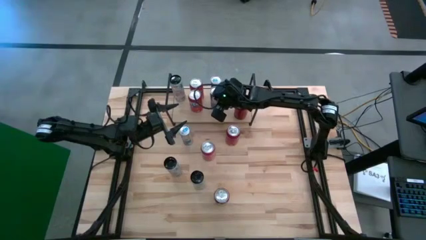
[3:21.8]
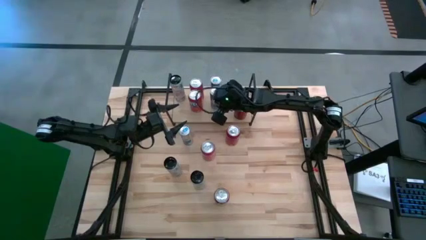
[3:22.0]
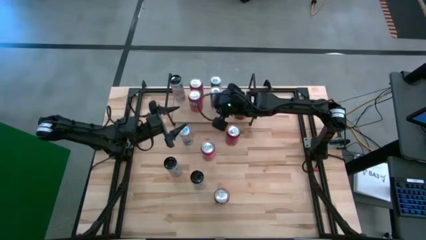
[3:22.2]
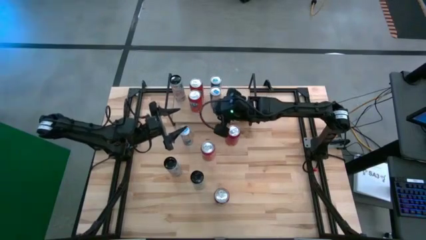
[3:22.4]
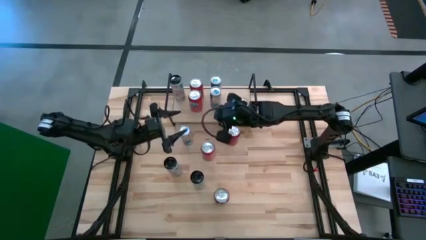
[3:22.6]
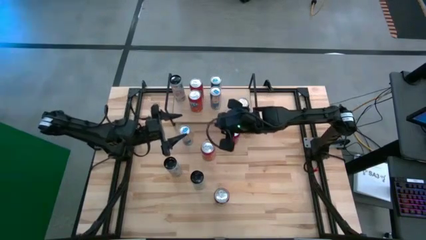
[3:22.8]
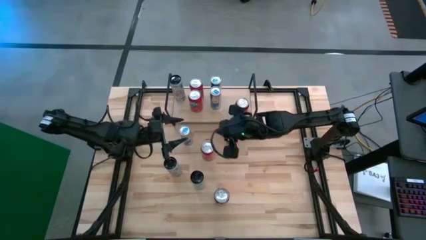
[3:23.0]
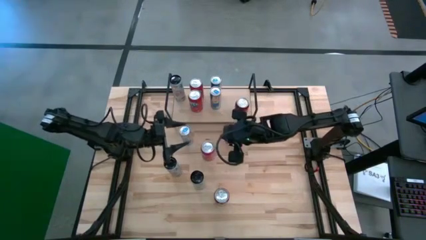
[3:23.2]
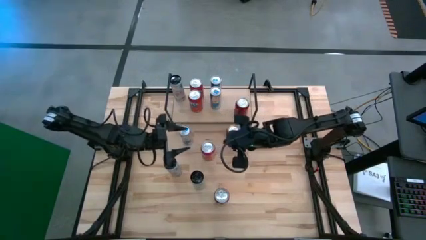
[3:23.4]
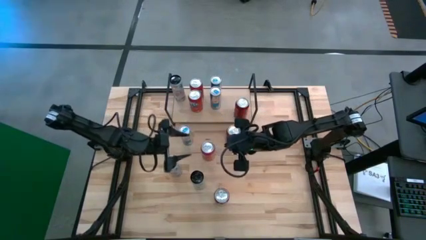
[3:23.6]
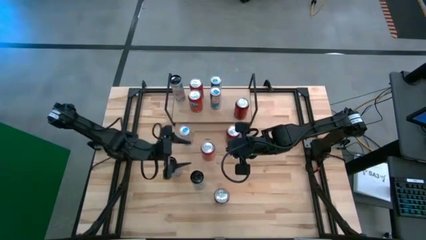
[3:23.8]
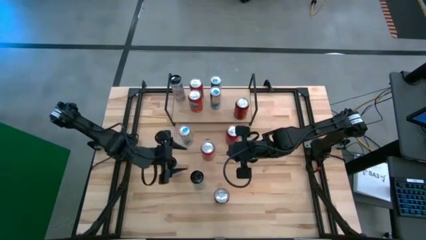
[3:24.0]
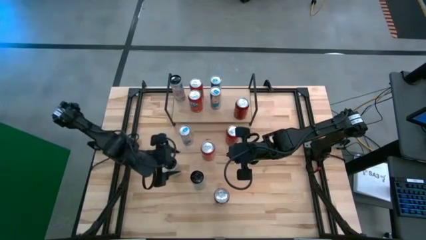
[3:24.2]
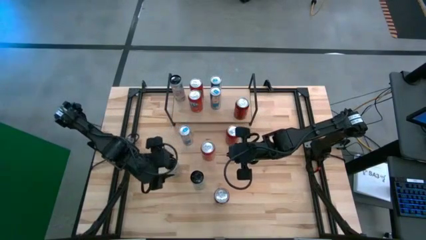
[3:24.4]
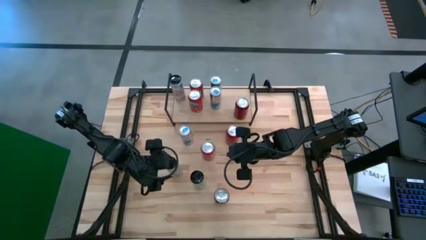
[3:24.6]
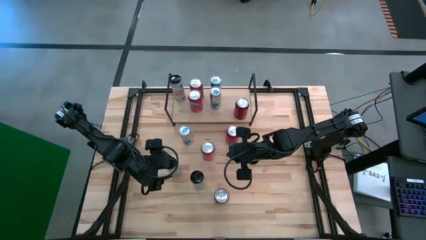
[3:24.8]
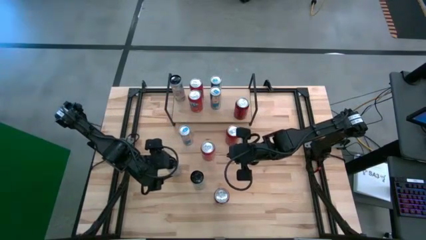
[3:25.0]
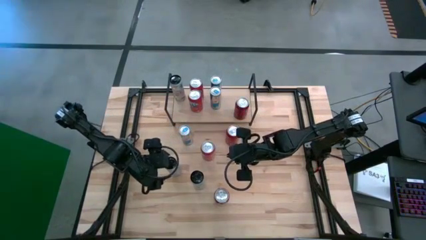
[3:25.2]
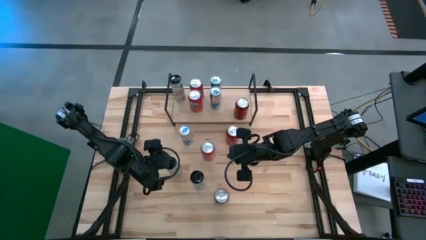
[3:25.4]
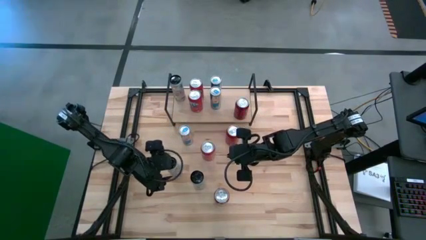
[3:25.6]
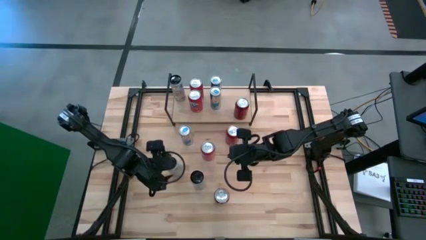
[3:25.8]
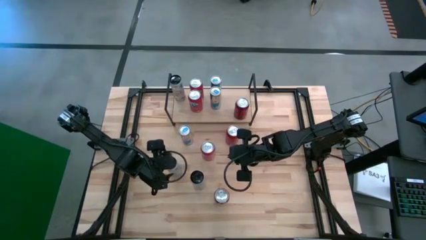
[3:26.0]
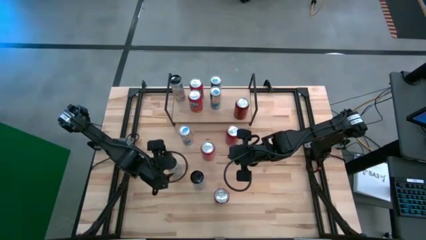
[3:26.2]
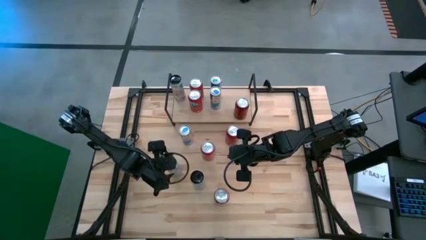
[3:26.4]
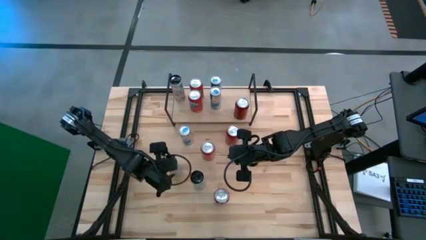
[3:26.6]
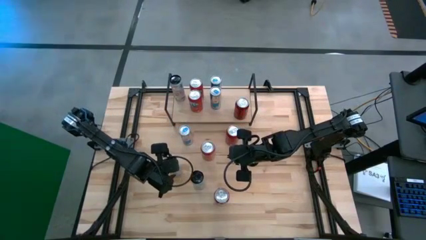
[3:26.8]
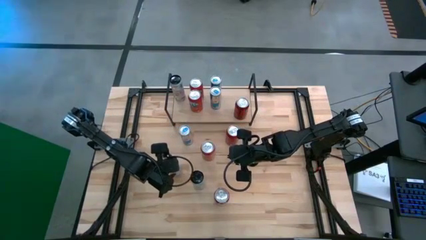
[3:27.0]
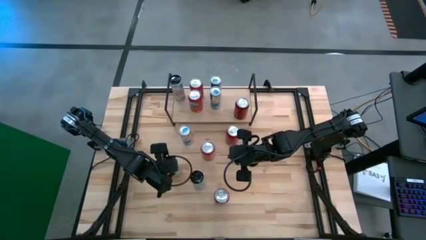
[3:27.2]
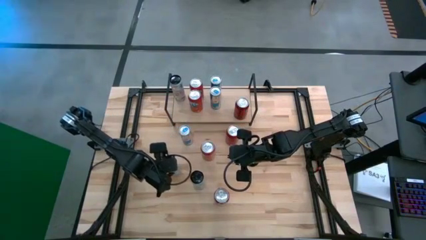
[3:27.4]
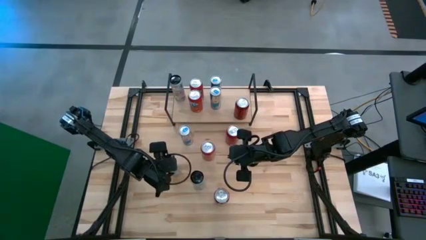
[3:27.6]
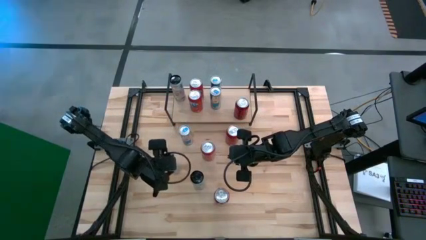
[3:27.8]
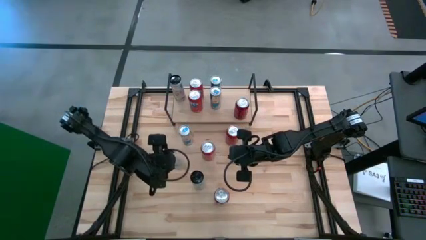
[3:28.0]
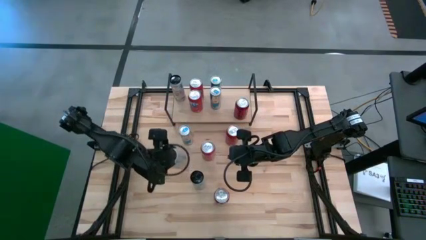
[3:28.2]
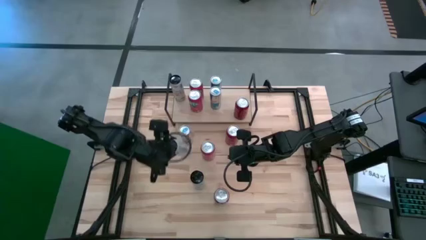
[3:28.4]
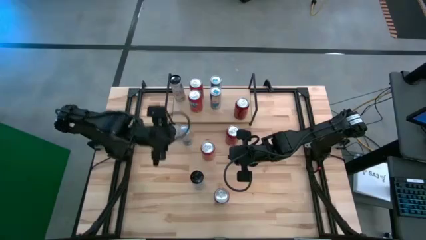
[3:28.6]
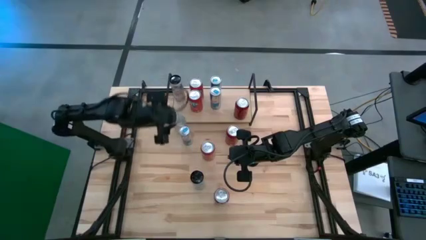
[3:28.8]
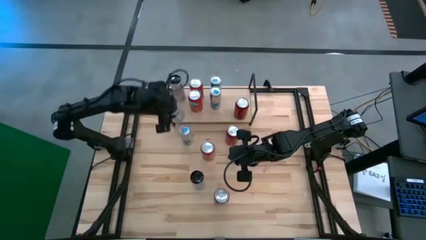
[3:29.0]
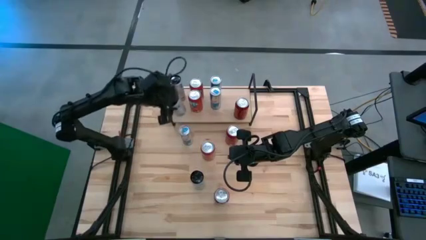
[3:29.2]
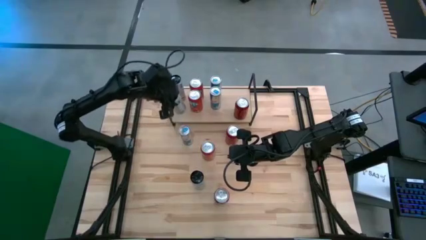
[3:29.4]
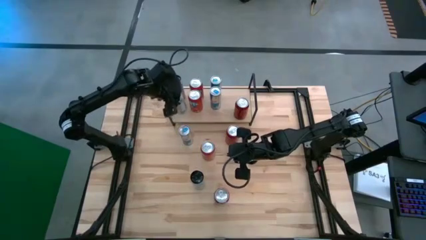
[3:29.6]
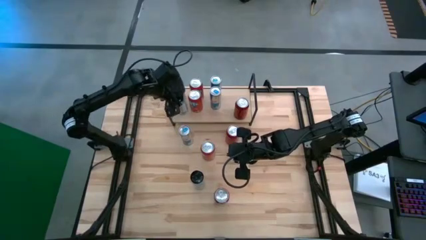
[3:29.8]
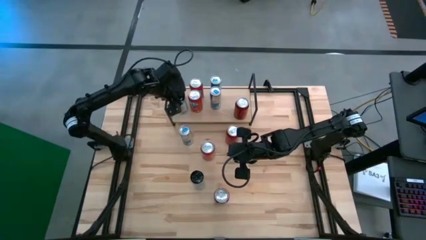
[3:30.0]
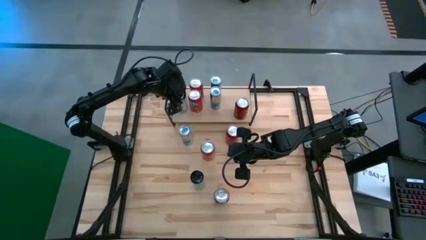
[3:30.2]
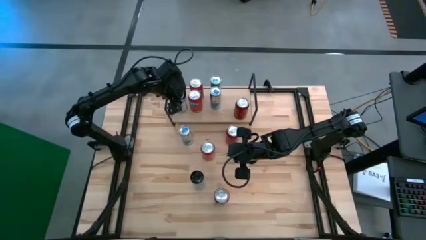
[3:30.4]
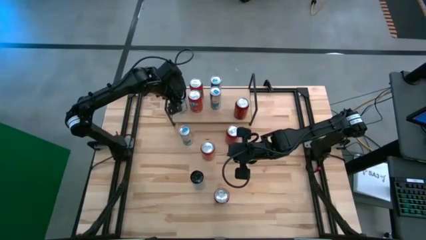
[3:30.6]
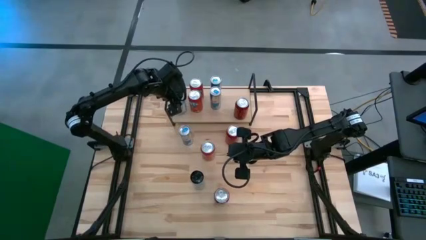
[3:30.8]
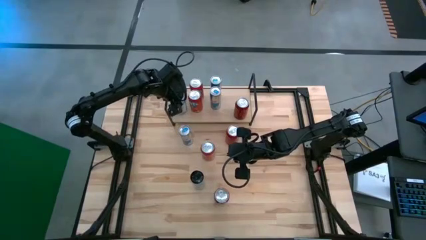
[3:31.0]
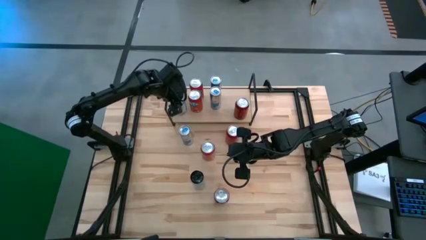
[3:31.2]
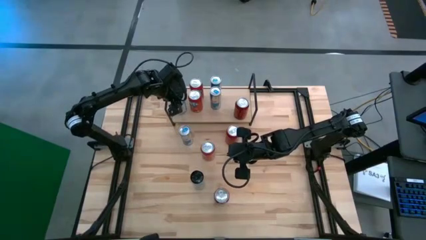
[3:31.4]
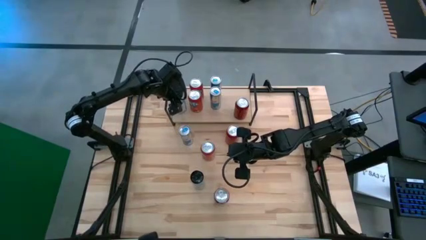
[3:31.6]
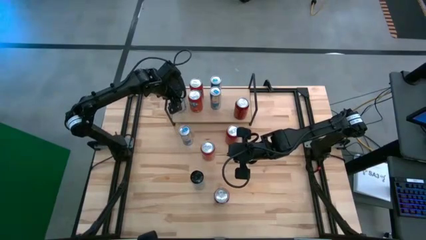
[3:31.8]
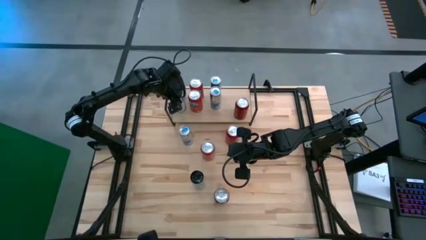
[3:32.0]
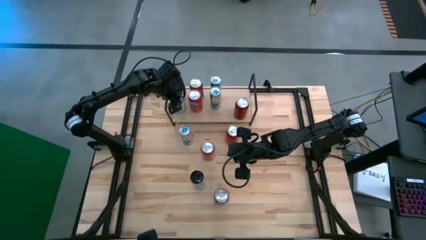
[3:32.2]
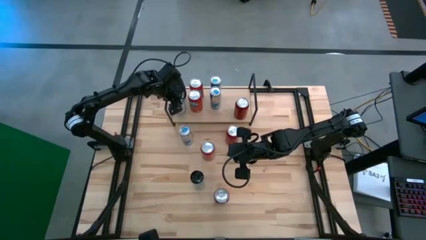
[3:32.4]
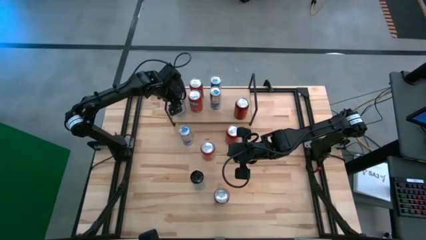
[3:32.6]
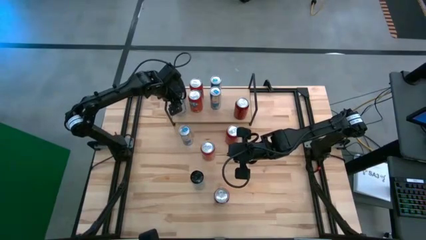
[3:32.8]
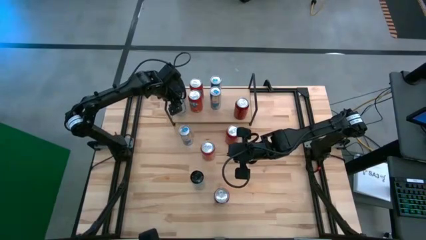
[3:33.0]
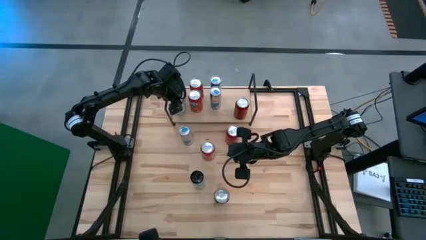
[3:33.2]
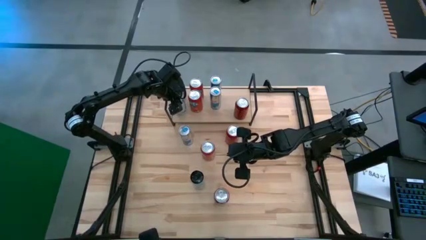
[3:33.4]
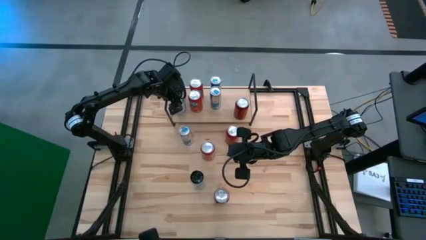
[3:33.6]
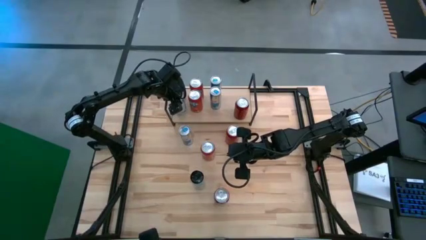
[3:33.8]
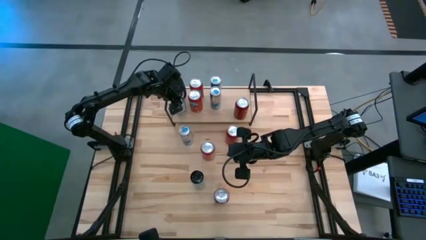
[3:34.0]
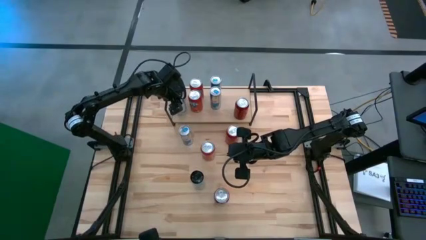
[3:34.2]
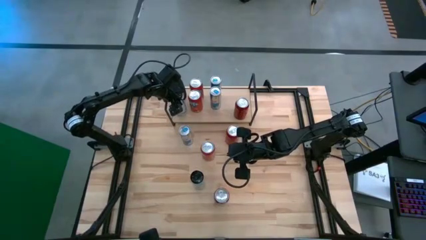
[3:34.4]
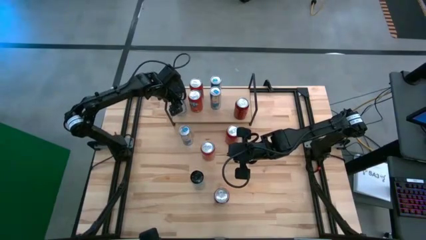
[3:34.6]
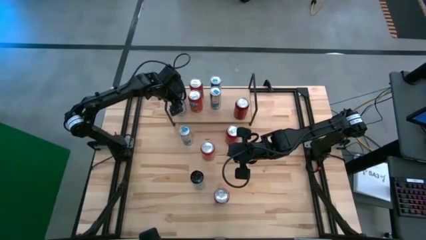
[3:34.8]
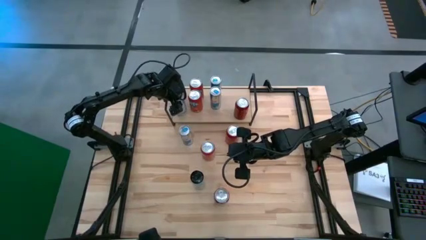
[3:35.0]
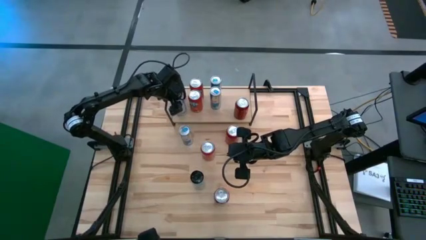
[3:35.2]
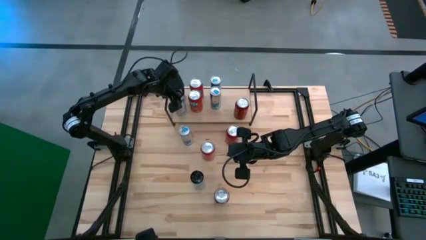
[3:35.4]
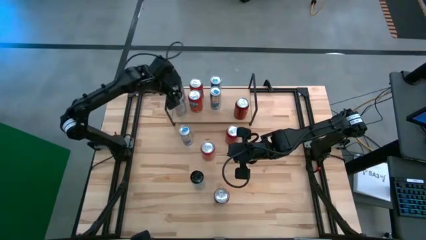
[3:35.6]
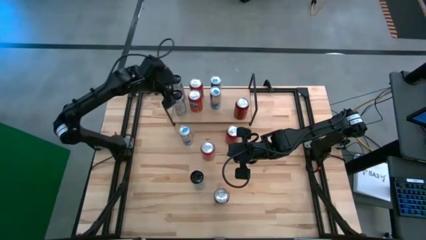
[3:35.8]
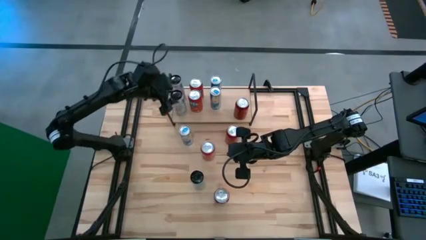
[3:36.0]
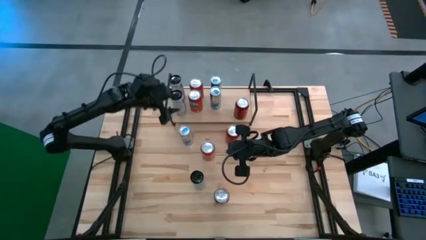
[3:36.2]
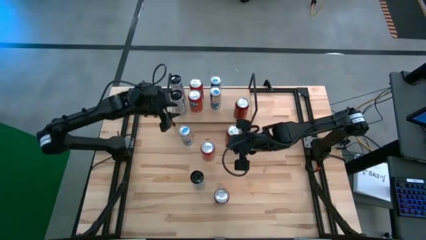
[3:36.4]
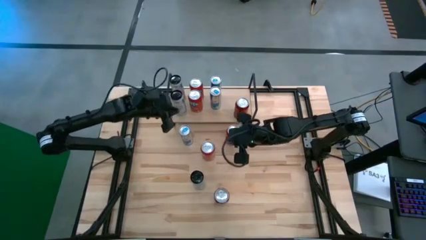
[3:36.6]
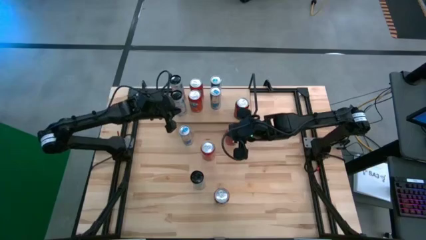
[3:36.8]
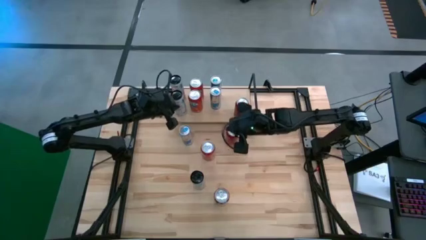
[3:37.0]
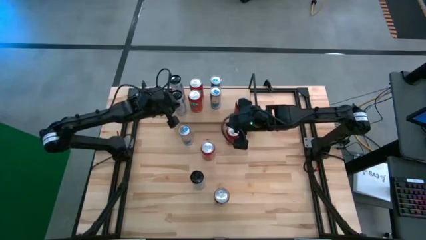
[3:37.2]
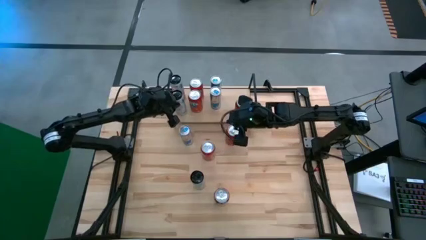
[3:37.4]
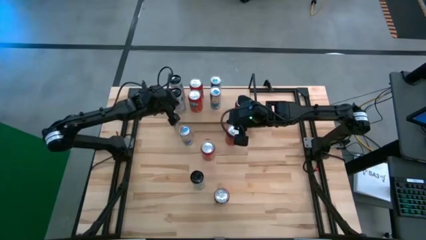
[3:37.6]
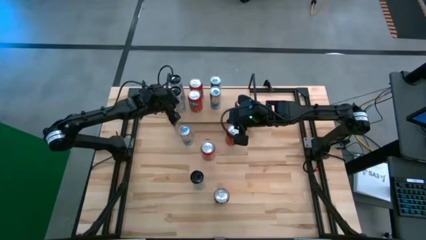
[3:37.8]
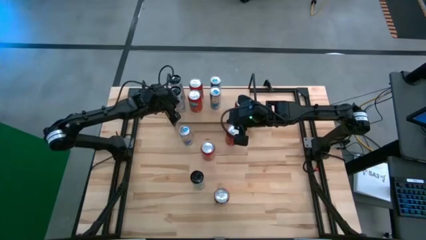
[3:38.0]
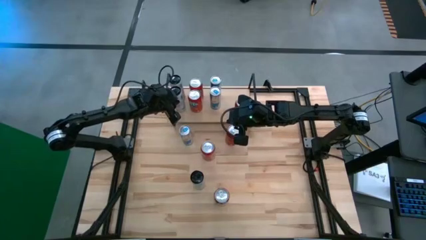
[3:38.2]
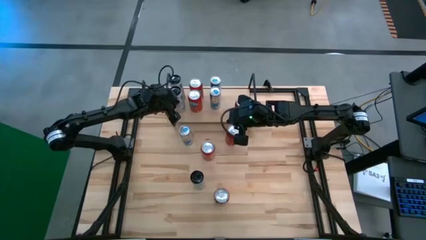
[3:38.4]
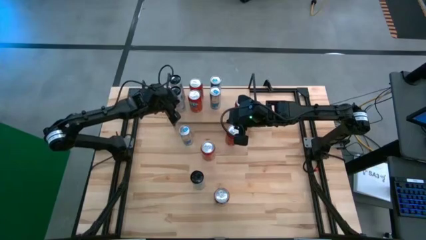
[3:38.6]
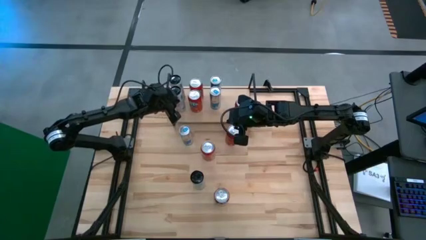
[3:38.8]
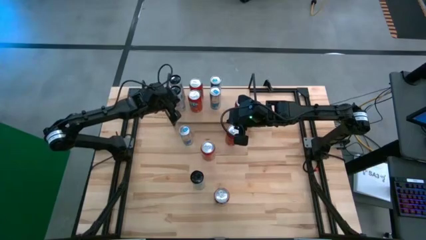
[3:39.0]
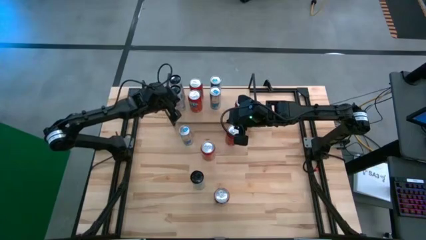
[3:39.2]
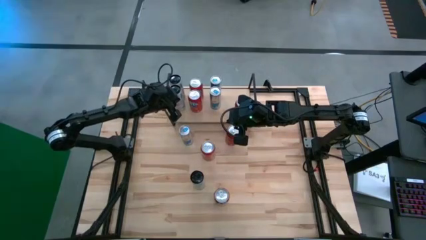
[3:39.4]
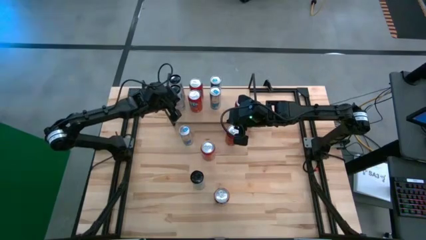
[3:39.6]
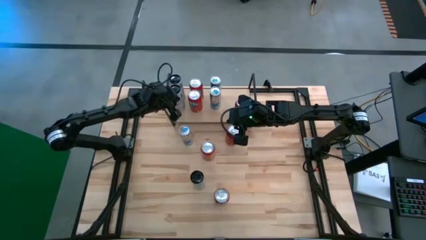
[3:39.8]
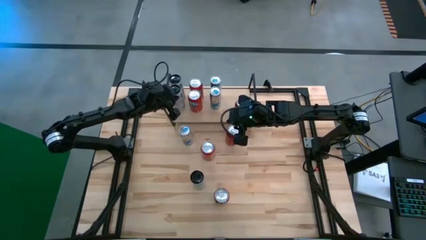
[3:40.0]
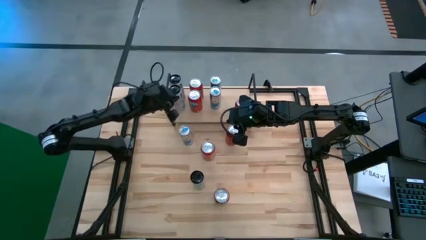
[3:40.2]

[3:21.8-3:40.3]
Task: Place canned beverage on shelf
Put the left white soda can on the shelf aligned with the other white soda can
